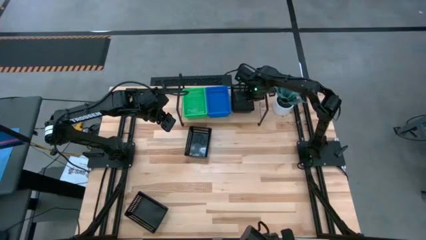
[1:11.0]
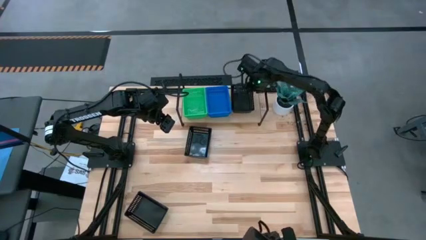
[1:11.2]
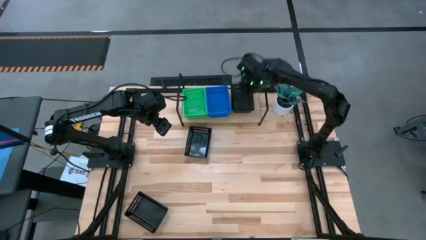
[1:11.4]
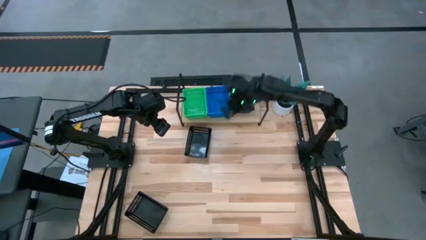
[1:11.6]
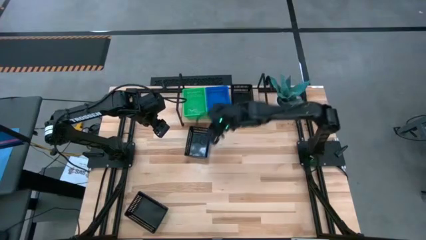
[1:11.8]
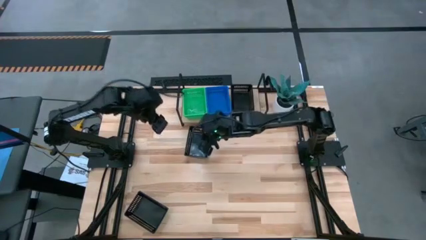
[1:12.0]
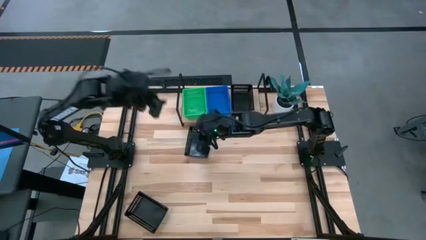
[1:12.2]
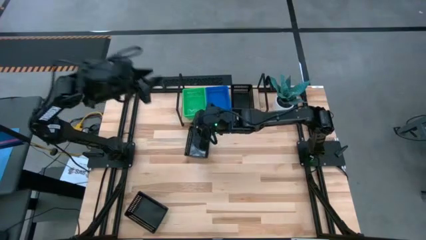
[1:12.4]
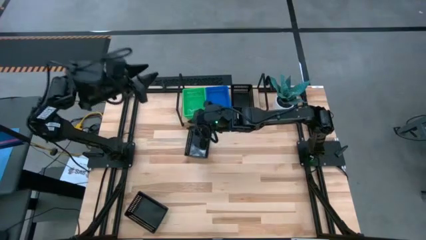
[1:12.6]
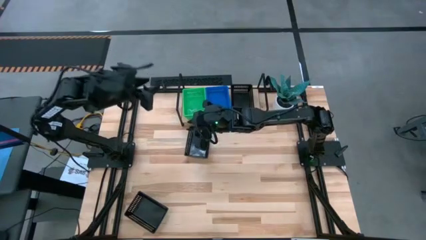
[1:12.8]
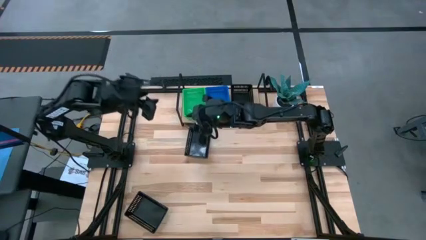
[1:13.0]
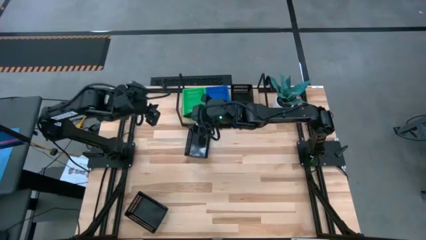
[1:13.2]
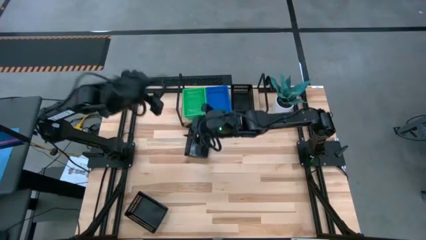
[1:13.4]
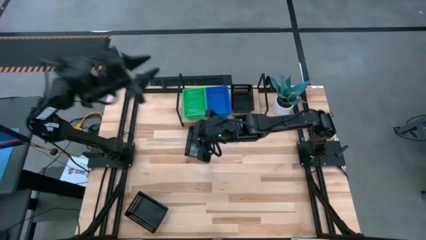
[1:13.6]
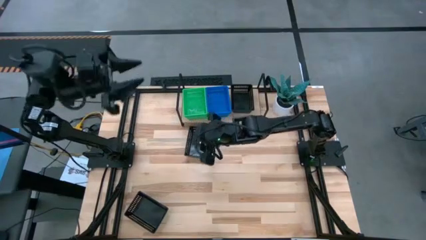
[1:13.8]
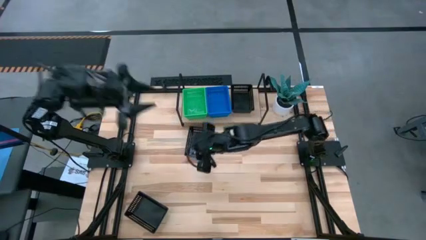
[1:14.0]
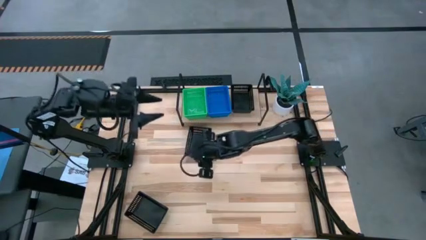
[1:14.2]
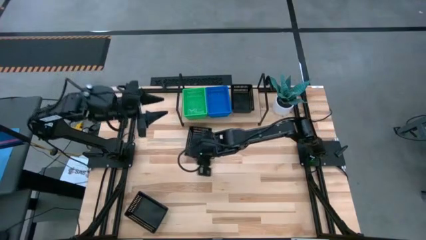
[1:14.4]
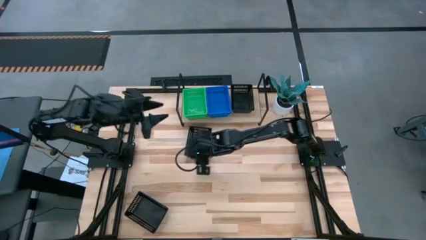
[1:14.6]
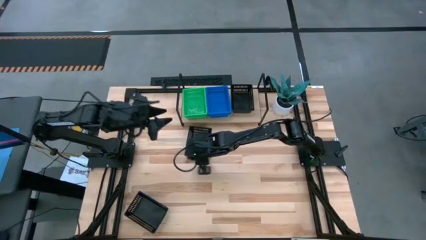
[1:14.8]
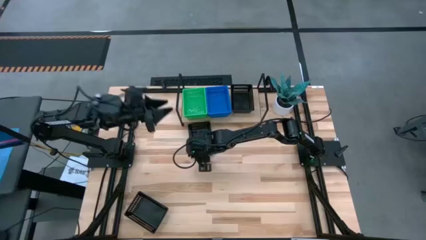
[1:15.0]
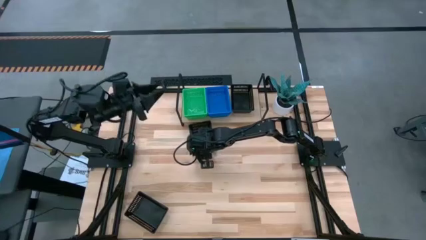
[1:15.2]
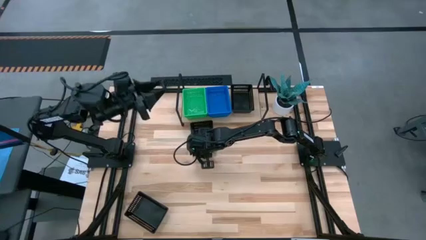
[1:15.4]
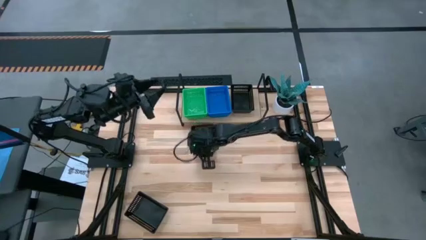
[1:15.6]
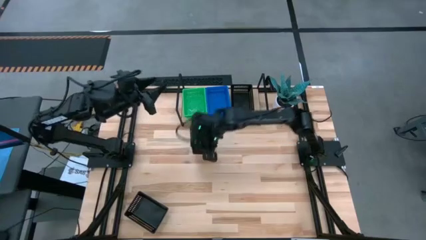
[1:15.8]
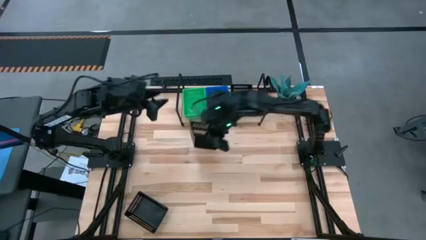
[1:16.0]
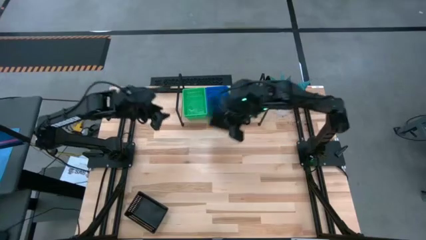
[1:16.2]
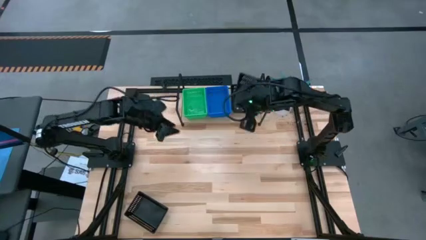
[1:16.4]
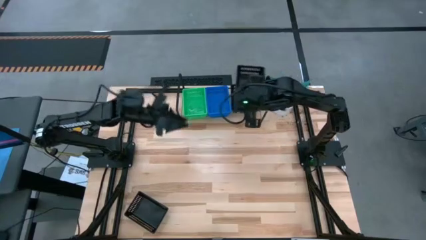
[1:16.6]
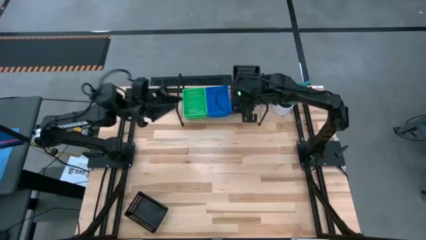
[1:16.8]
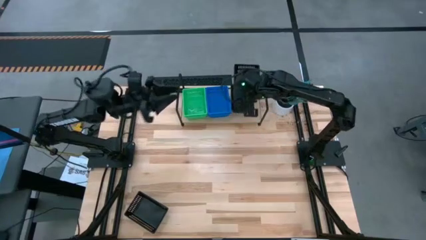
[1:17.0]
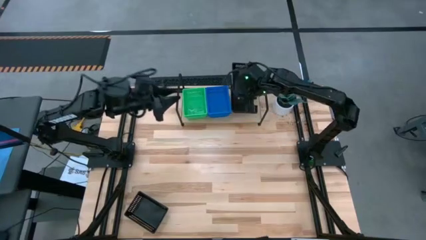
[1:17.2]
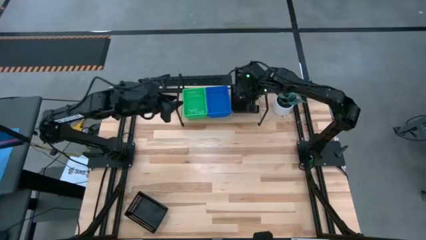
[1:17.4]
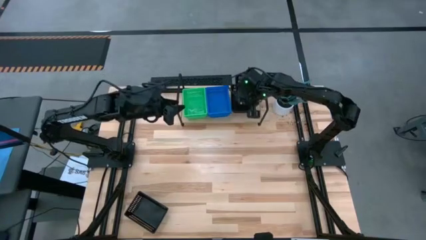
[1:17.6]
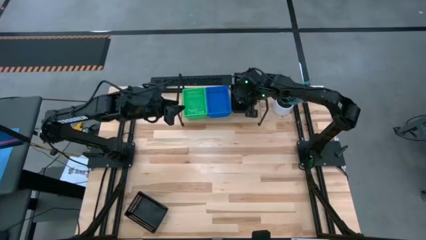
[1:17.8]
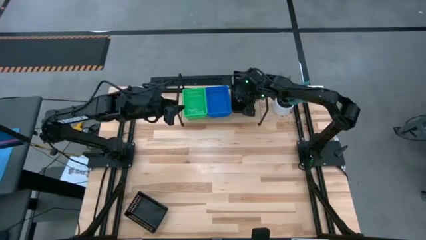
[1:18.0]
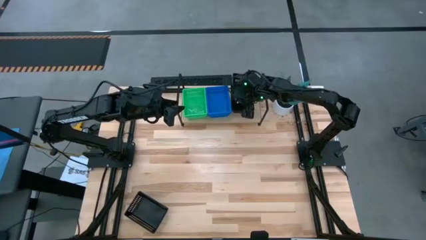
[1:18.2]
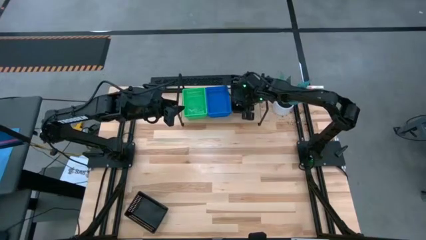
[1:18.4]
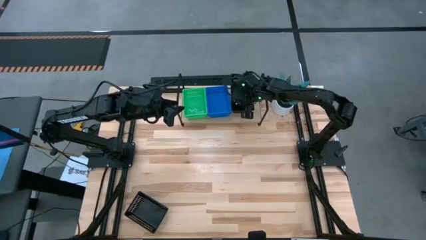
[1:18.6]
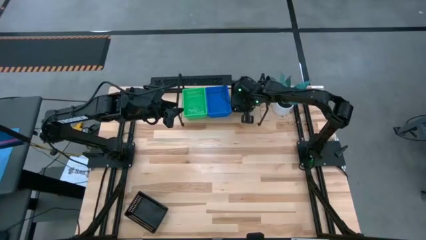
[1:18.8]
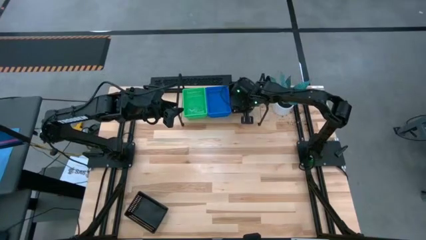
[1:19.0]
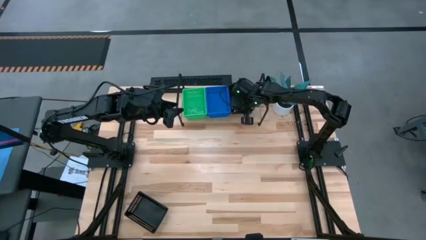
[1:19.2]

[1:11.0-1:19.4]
Task: Stack baskets on shelf by color
Stack the top black bin on the other black bin on the shelf

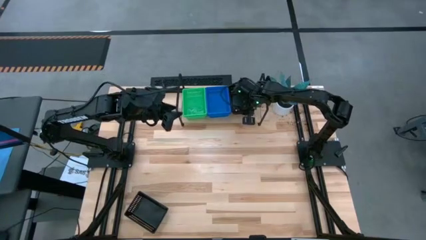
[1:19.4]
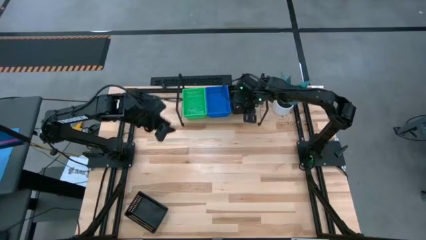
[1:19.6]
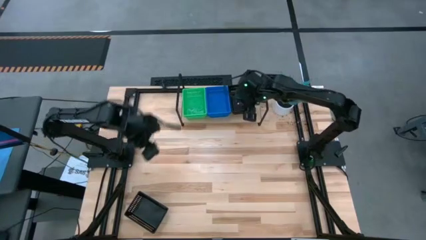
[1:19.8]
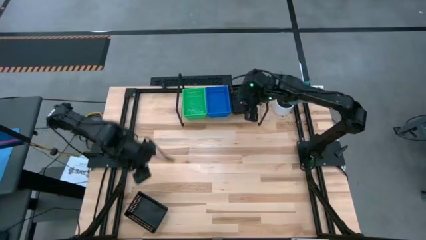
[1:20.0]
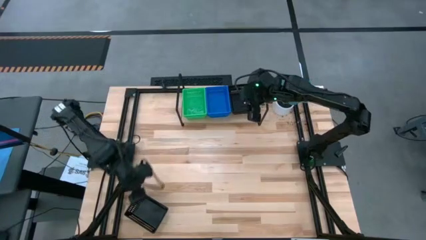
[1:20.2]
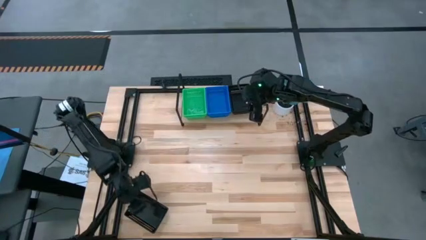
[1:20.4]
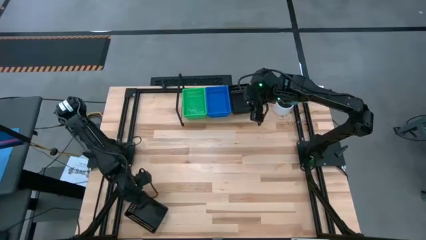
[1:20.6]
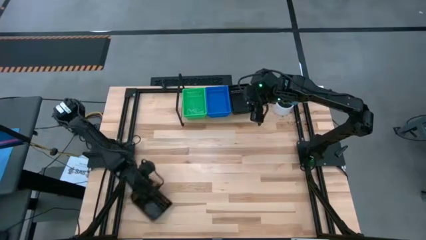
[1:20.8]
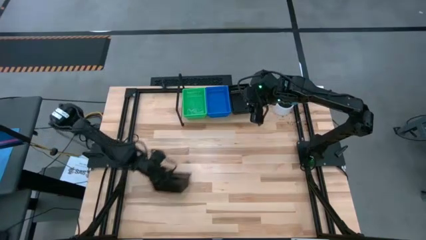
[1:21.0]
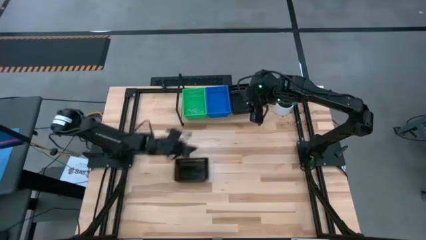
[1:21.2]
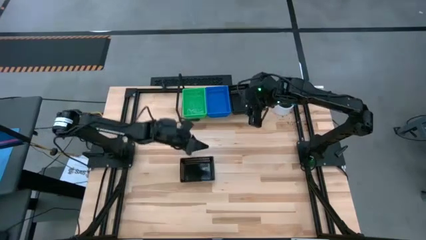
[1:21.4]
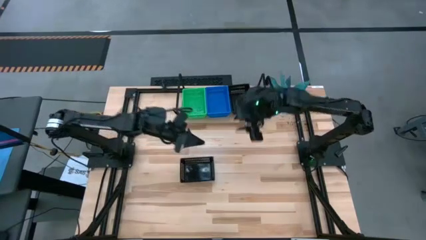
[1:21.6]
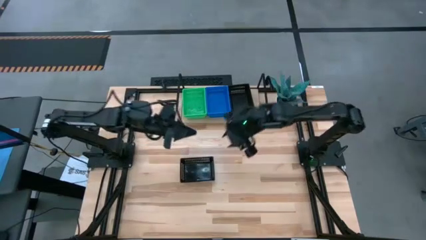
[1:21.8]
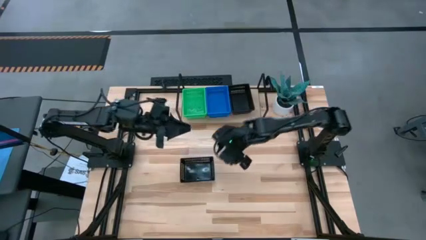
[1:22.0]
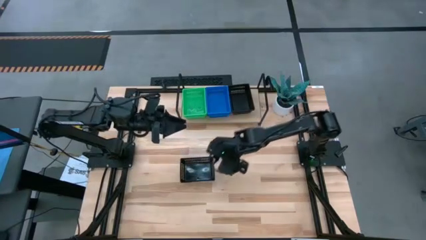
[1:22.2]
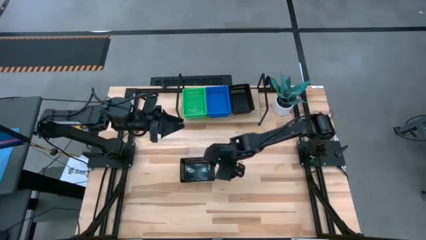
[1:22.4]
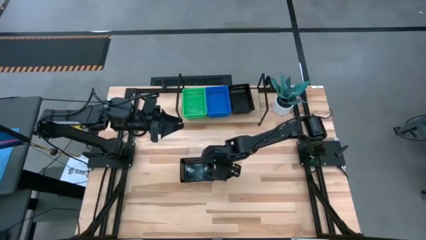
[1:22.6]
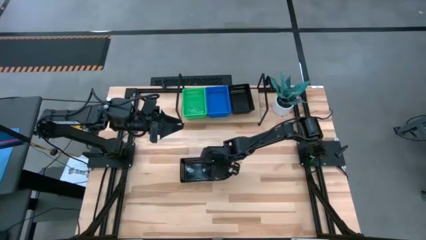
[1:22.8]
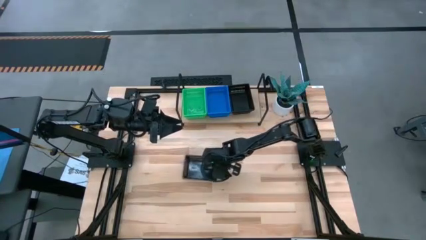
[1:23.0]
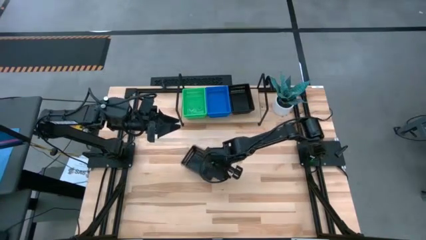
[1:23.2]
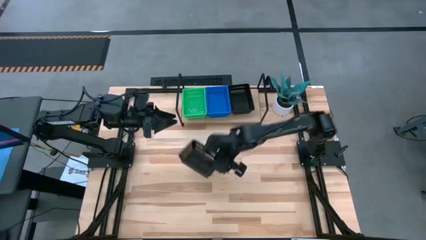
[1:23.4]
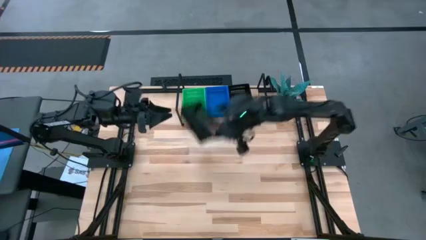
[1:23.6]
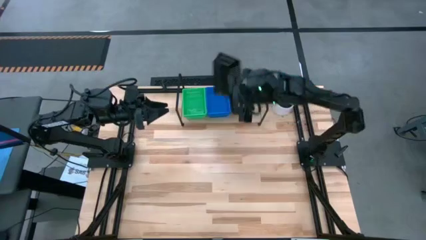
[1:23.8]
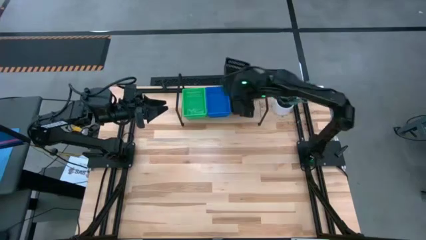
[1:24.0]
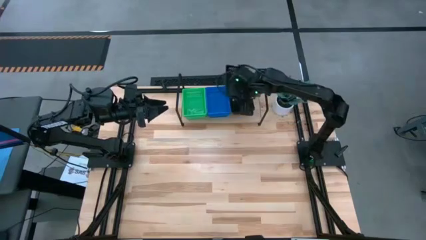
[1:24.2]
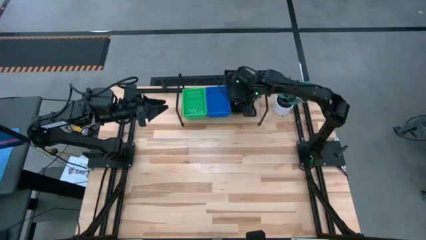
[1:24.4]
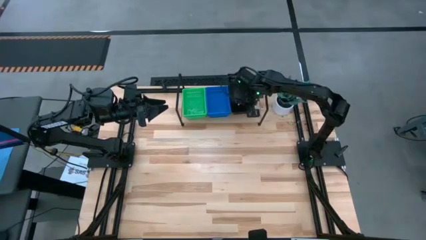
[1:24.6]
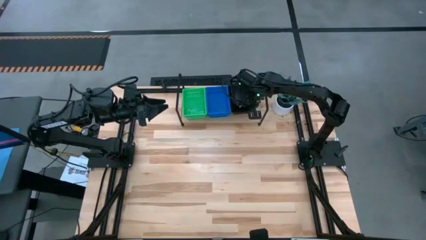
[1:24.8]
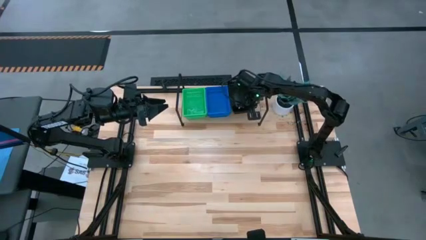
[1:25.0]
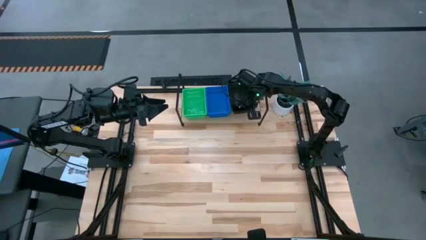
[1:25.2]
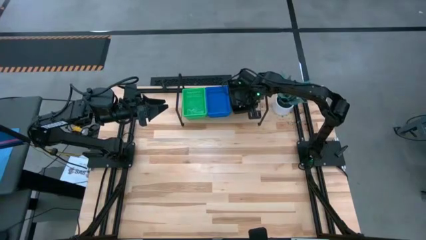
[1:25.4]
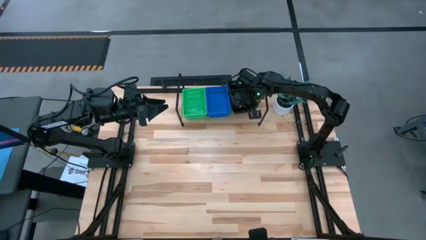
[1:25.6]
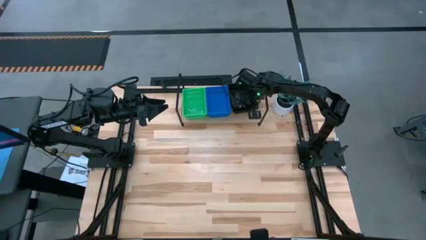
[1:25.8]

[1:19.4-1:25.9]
Stack the black bin on the other black bins on the shelf
